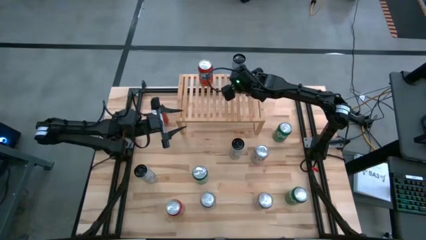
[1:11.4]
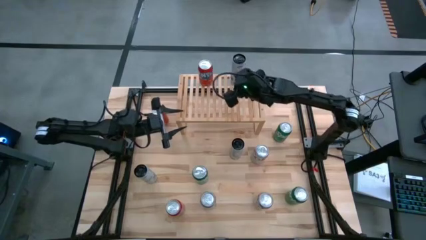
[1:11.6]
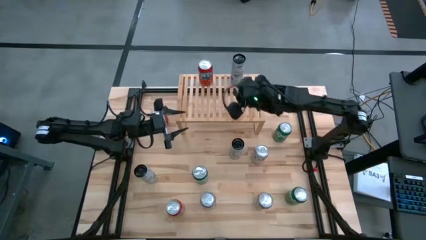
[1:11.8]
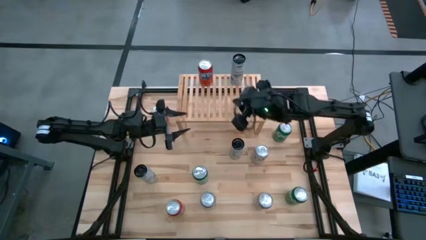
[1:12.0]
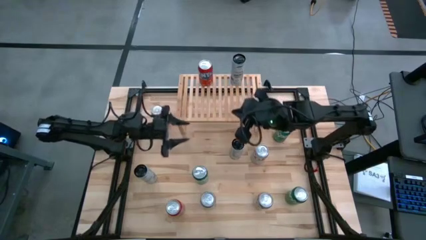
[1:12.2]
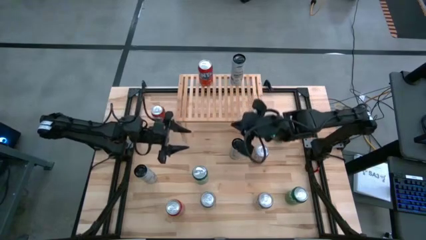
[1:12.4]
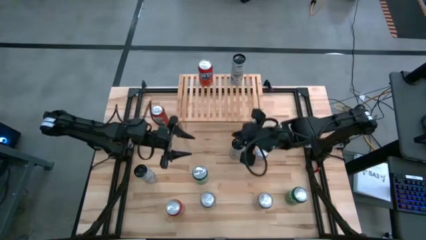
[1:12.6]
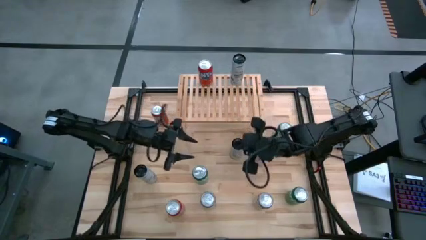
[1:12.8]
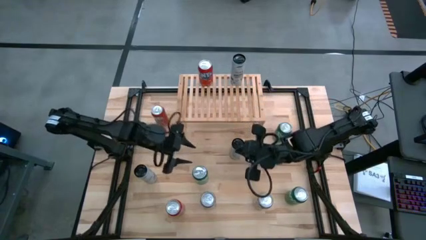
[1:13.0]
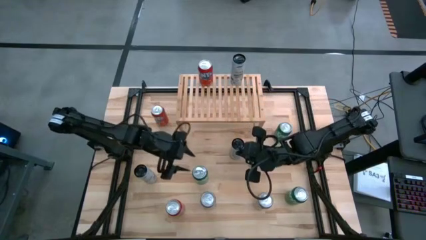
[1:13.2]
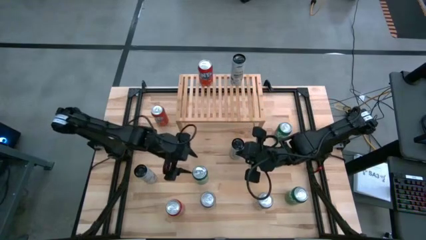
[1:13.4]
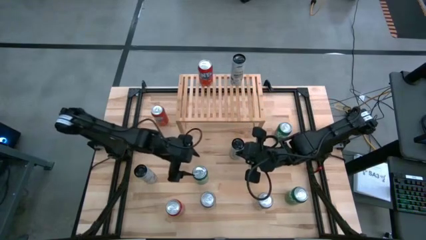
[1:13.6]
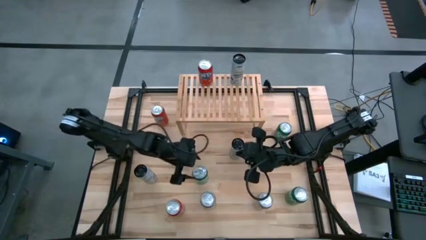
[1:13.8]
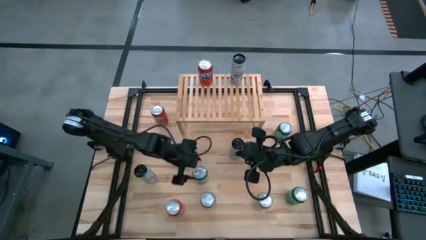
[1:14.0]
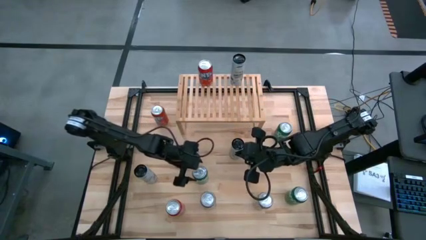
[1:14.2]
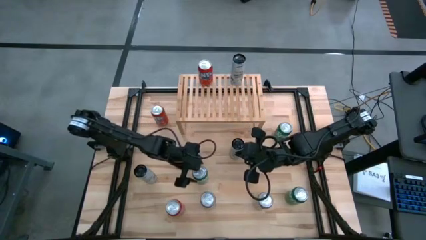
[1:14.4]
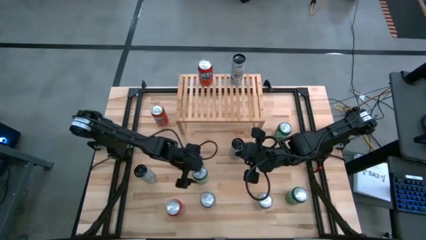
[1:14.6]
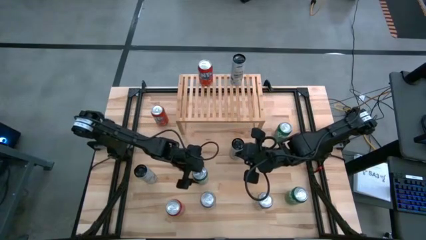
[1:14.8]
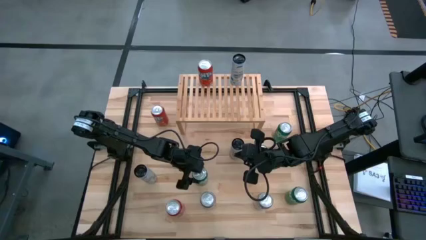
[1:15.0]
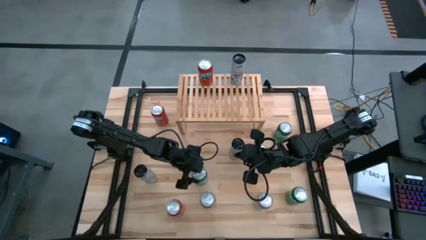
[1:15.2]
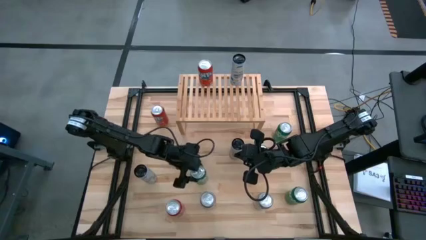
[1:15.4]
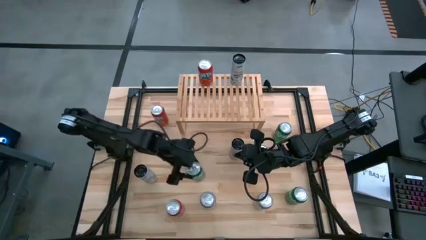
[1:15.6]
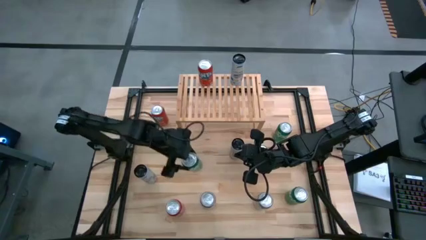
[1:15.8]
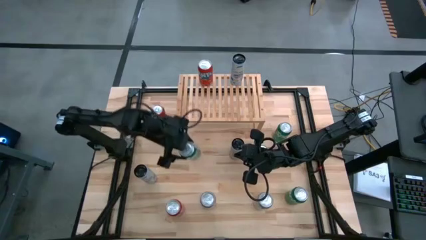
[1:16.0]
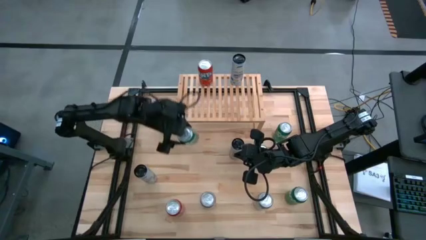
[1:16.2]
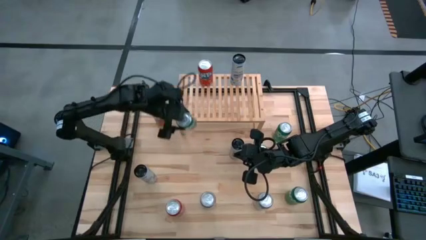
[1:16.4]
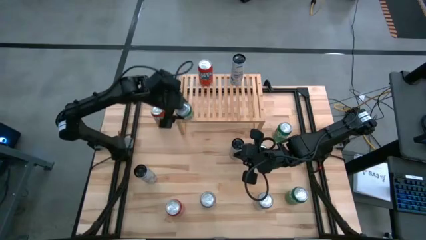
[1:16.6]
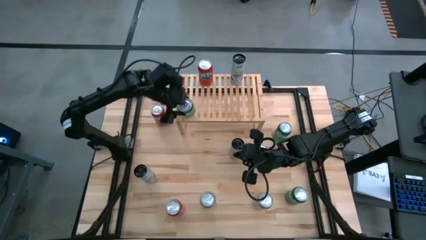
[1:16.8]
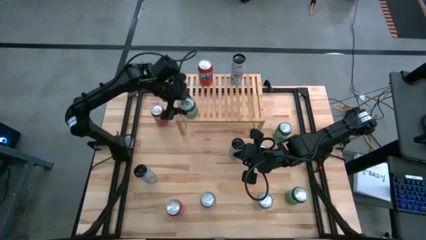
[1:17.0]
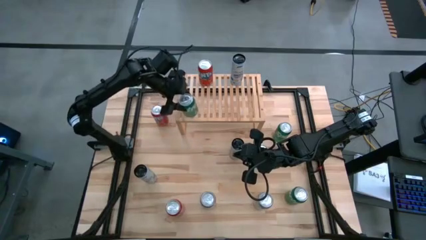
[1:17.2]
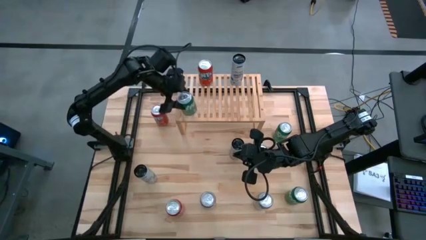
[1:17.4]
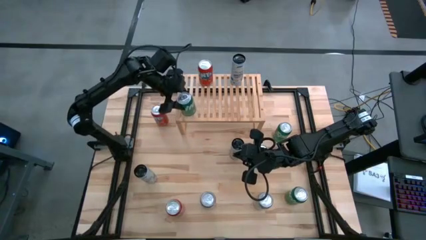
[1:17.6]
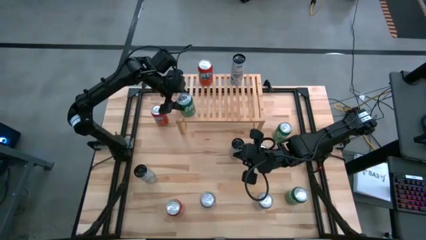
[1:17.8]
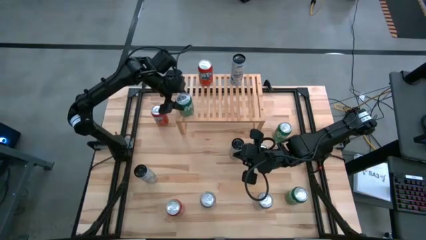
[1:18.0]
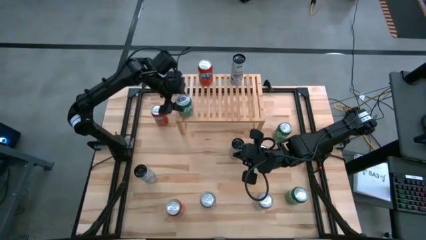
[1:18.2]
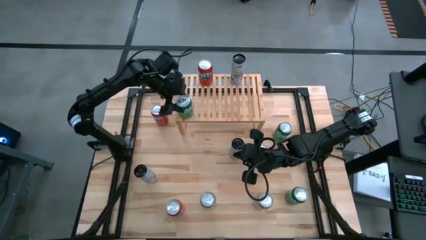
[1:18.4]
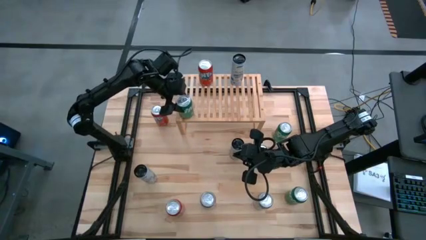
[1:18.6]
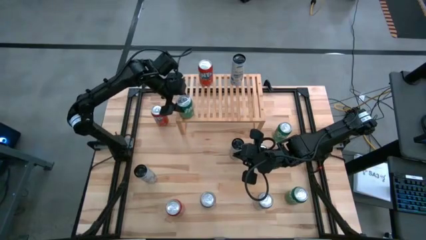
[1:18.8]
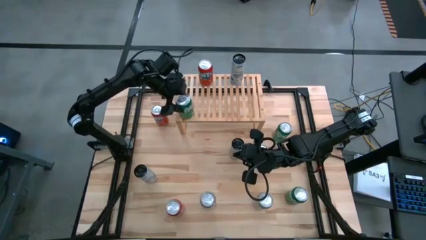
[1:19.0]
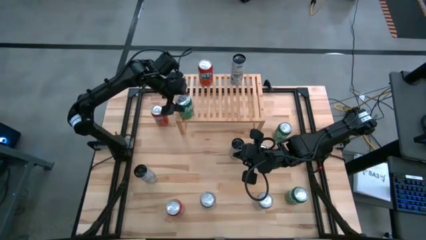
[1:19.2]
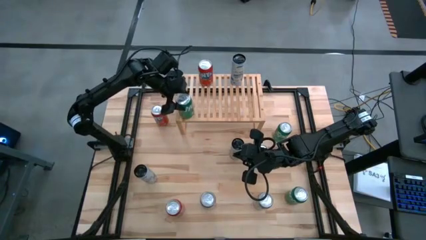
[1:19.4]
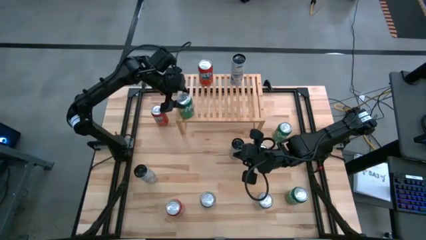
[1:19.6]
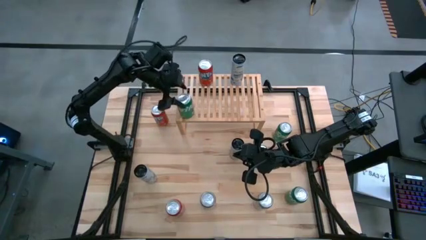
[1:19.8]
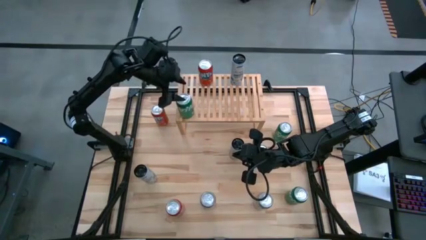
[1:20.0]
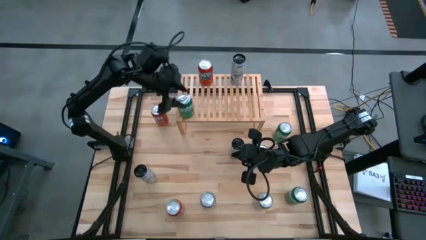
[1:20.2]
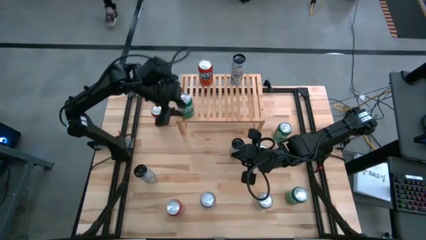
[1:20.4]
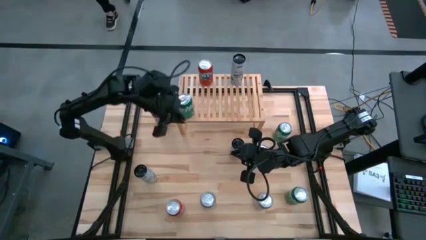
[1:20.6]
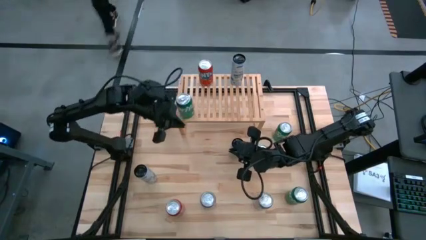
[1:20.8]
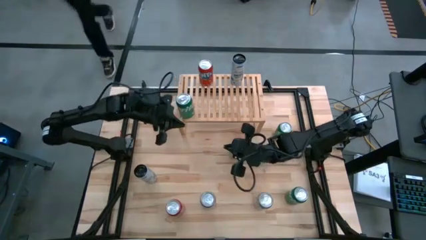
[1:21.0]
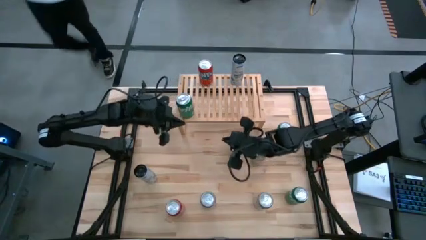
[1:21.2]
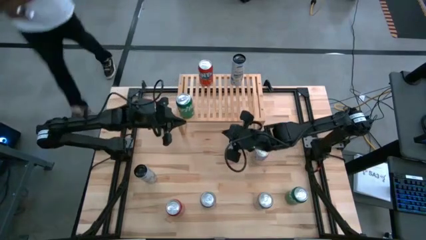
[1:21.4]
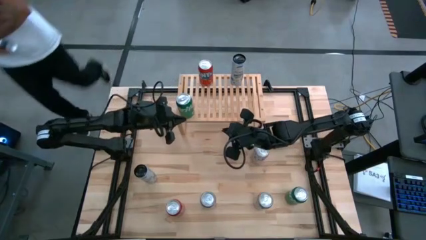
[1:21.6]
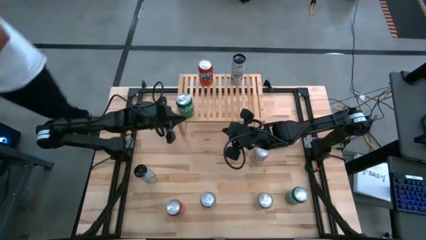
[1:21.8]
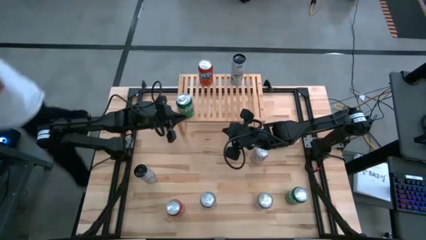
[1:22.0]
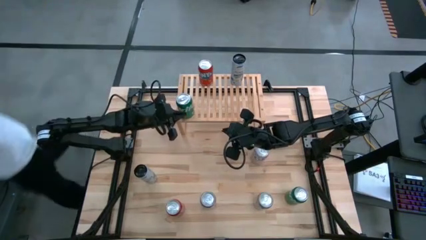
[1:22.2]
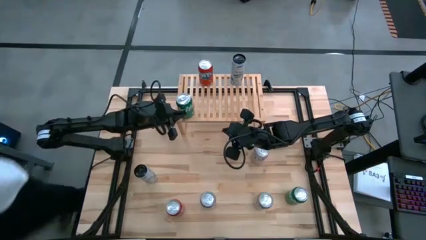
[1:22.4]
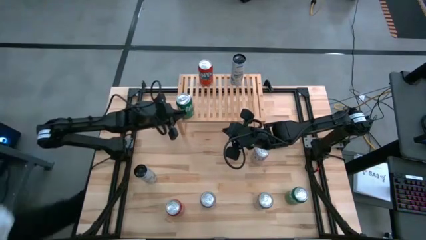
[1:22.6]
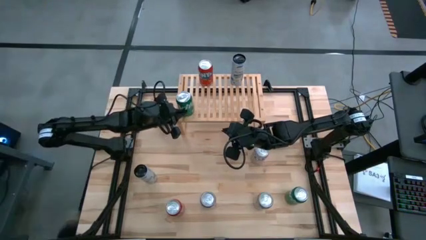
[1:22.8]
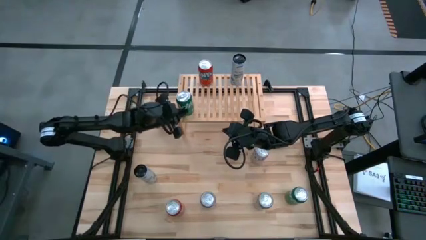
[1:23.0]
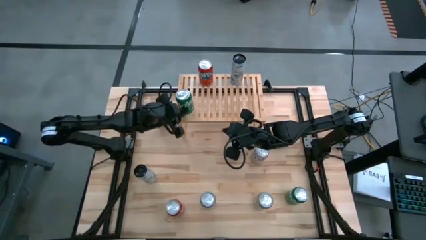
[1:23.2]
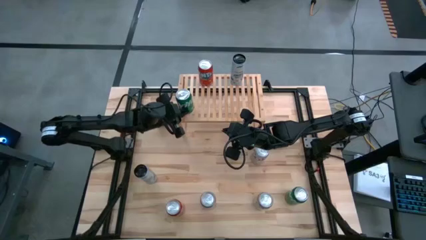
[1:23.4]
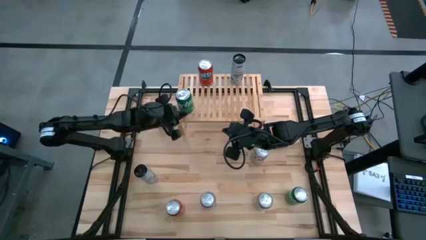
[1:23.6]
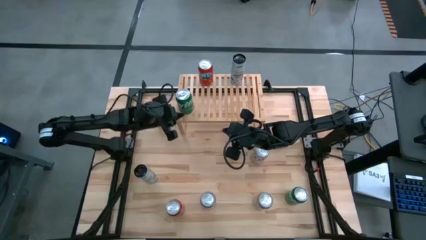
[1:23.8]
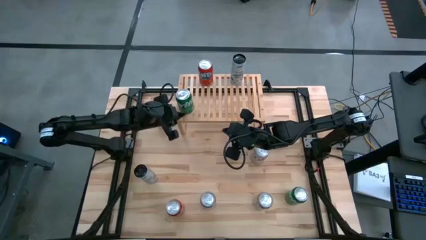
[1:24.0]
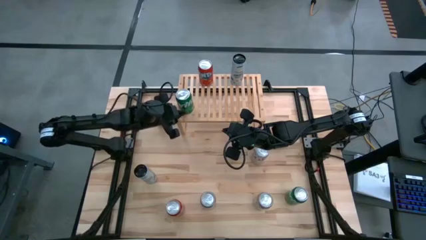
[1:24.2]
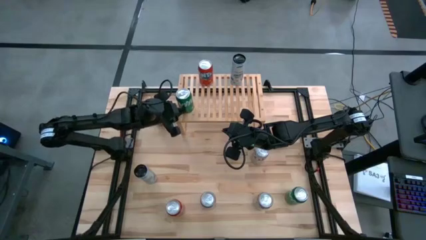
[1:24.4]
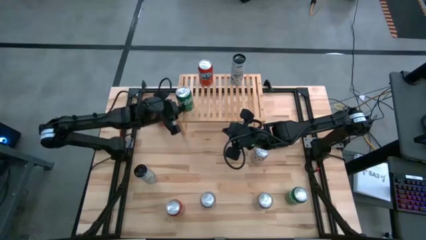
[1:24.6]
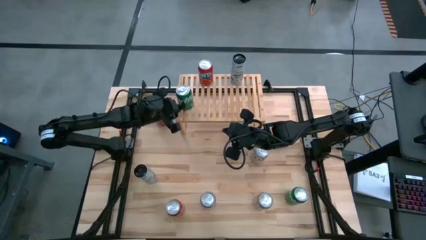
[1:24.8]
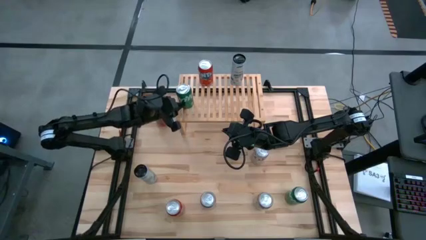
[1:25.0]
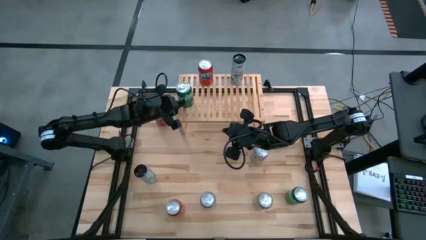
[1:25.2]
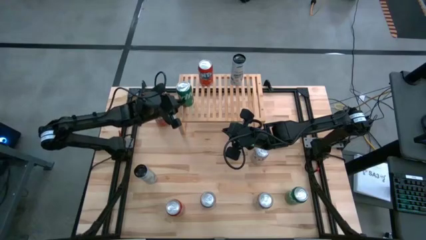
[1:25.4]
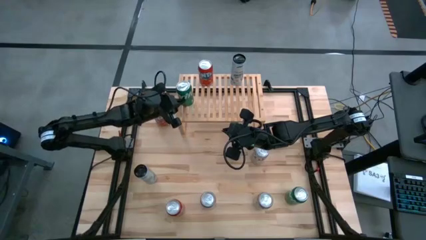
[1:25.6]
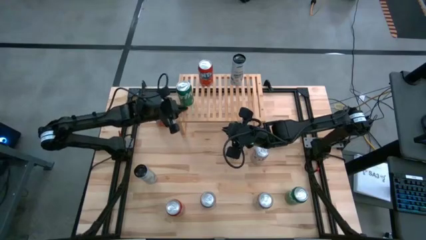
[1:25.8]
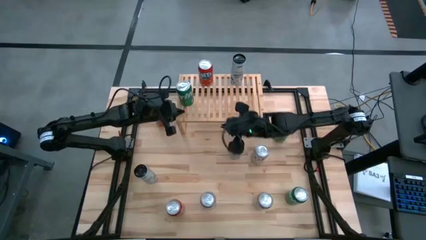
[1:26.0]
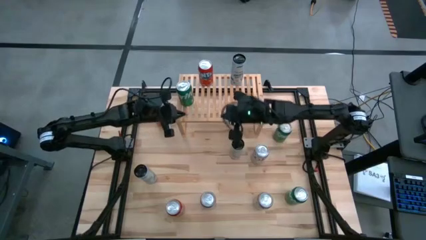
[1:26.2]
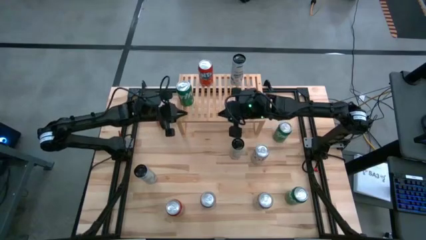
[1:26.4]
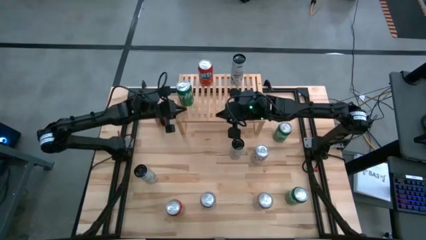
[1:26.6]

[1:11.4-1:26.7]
Task: Place canned beverage on shelf
Put the middle left green soda can on the shelf
